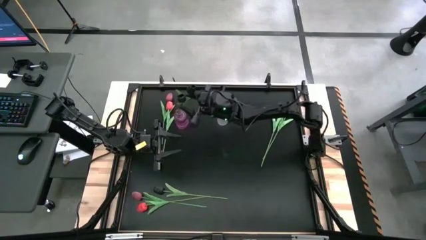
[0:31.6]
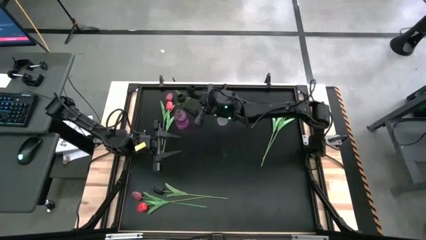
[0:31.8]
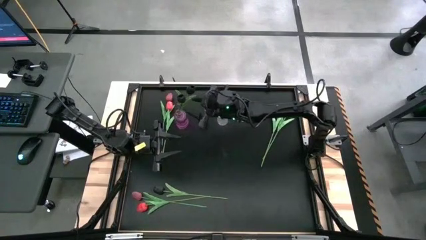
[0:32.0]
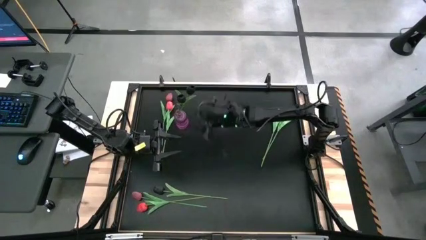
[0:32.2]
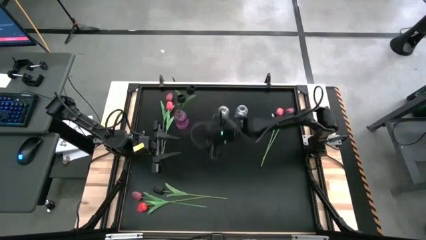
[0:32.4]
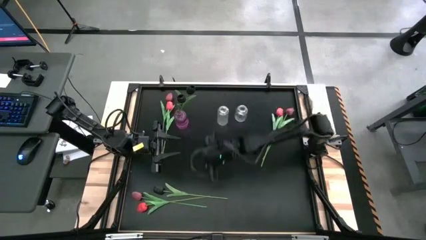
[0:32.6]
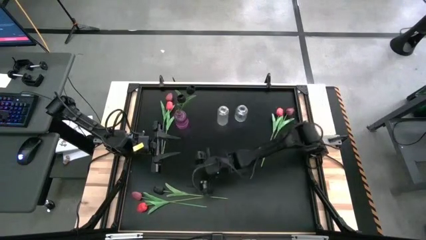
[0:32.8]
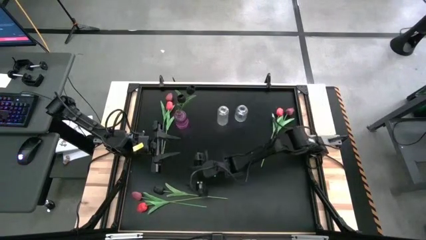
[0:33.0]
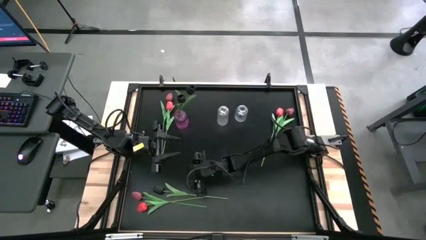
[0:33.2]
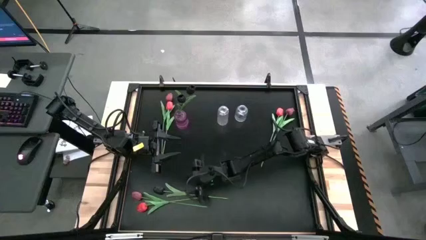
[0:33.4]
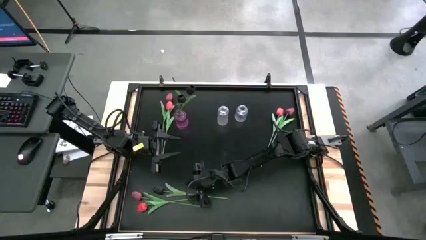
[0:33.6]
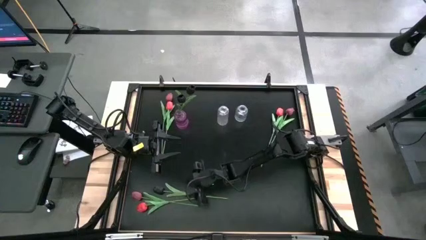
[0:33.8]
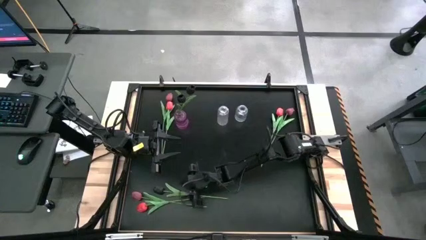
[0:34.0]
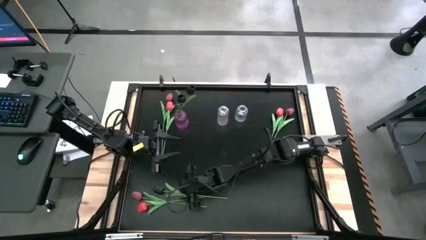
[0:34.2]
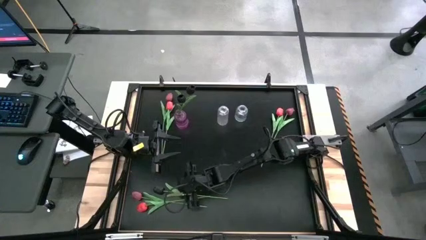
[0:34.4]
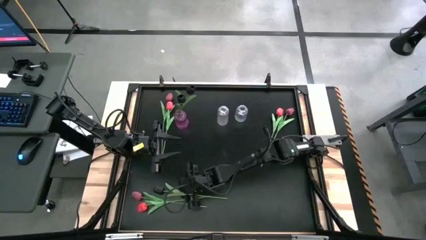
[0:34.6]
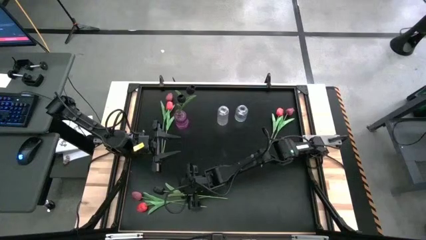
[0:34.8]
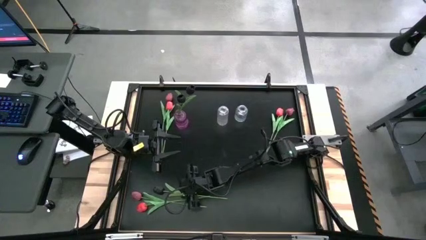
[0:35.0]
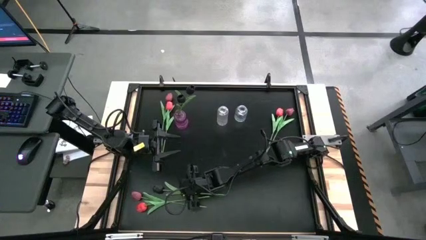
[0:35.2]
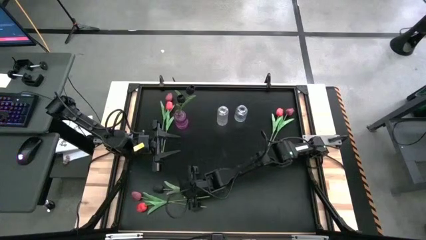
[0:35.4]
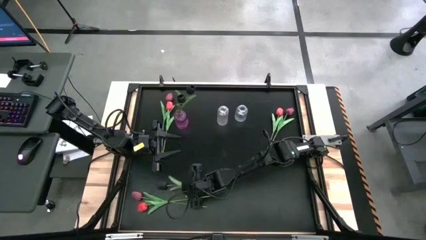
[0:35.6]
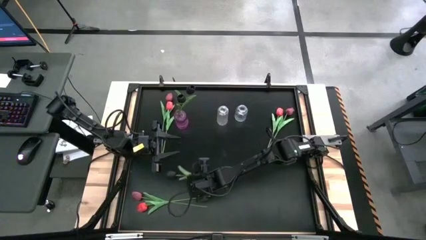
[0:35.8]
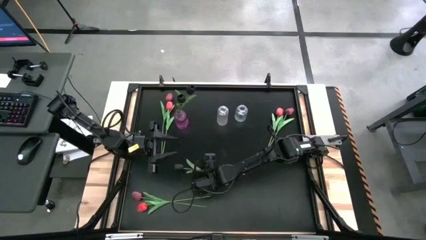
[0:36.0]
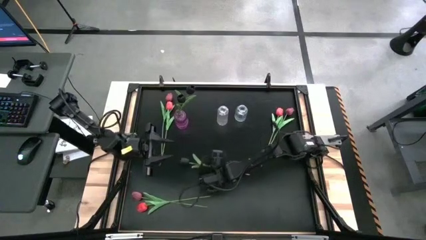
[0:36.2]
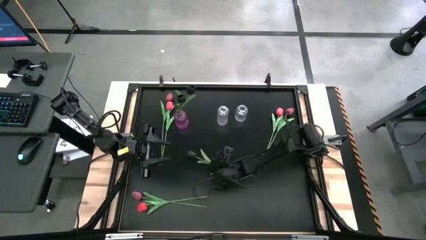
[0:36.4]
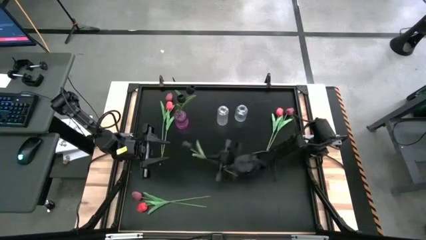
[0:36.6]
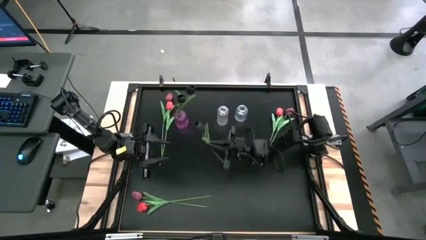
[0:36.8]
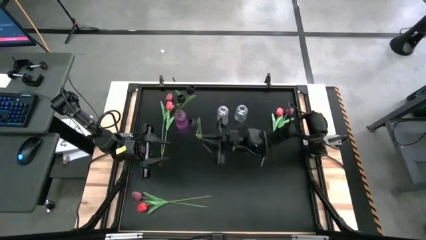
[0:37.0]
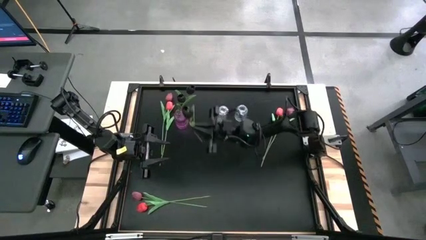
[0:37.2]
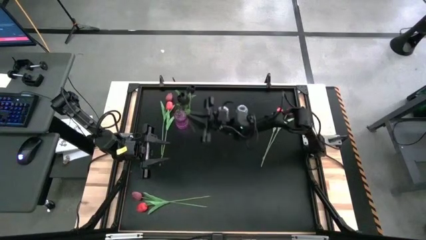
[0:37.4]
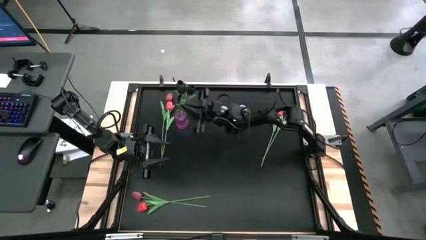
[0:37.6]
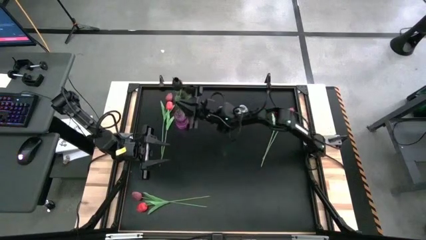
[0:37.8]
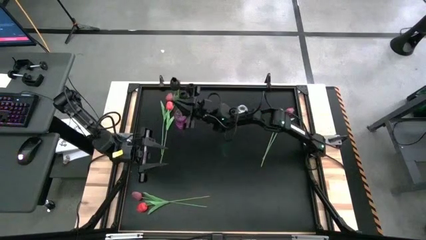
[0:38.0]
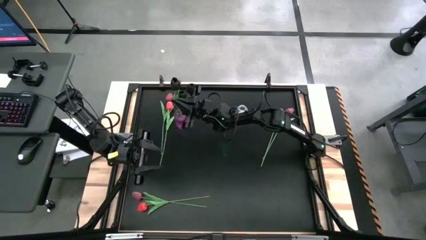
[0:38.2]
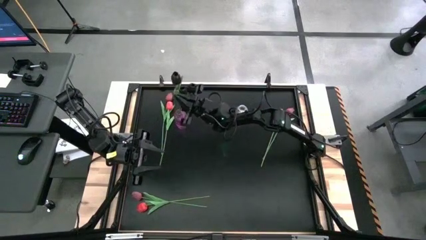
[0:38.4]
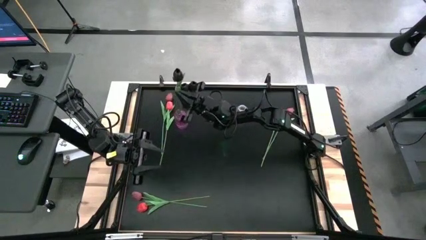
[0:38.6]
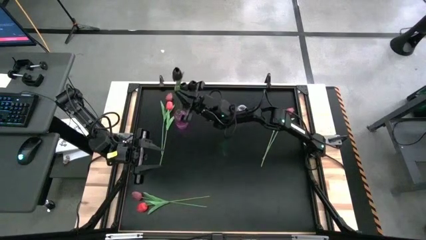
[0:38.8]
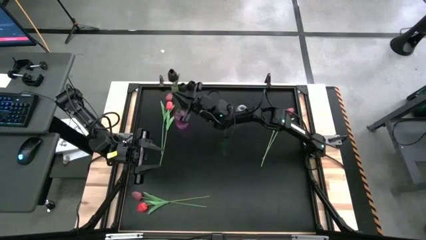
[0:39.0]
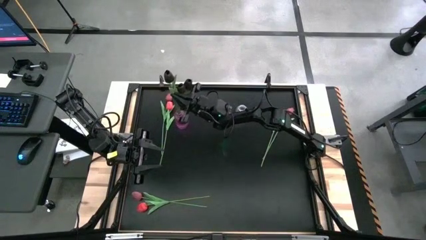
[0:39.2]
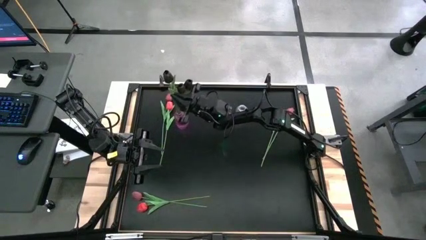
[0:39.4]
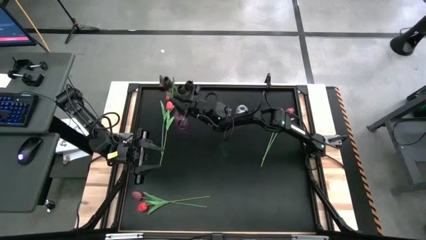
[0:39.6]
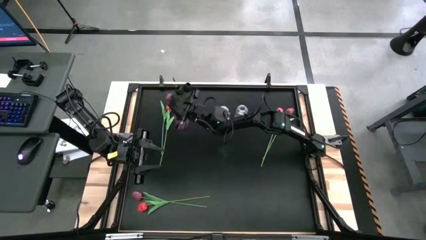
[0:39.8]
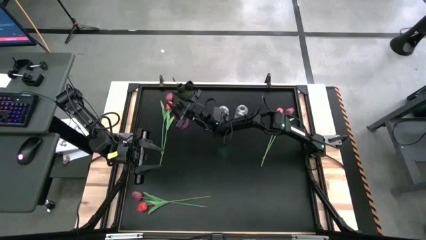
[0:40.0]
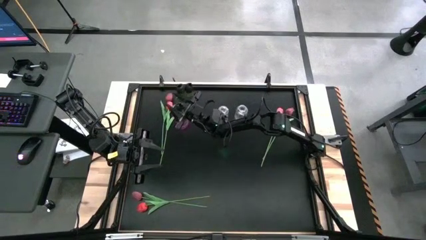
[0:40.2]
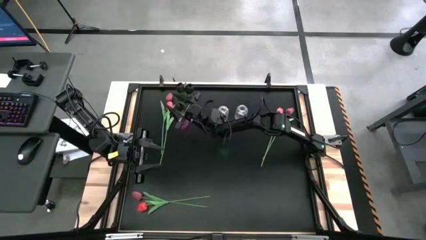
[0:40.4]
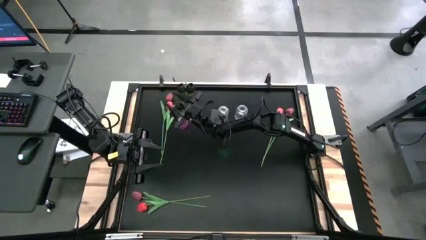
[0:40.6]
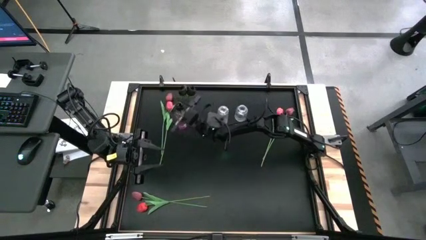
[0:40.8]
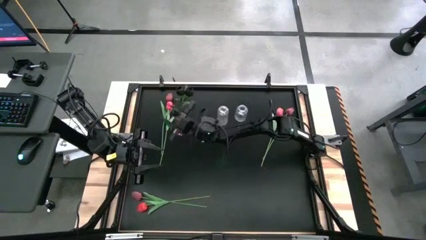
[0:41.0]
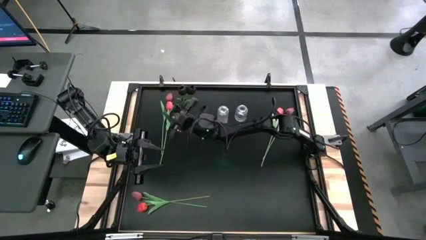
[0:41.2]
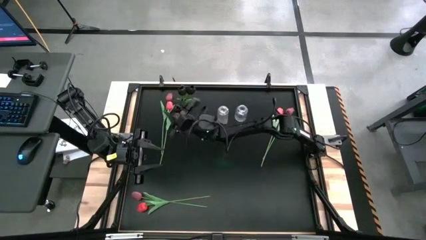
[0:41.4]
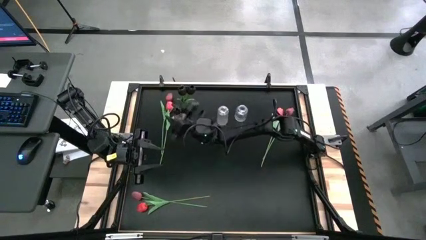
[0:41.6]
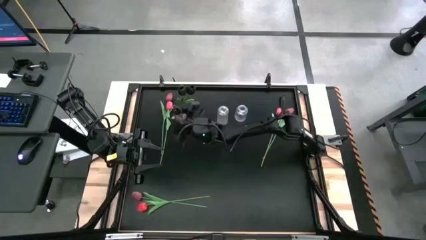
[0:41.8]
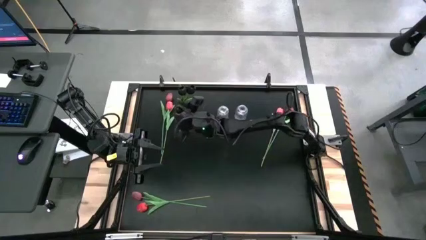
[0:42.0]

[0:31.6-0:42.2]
Task: Sort flowers into vase by color
Put the black flower into the transparent purple vase

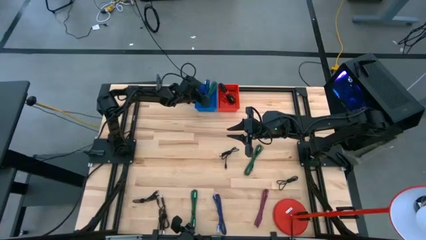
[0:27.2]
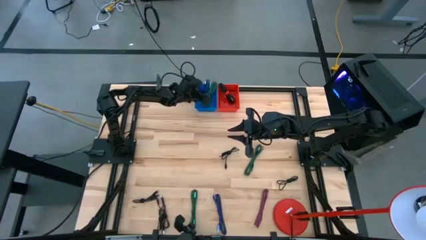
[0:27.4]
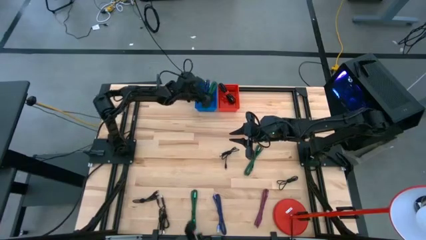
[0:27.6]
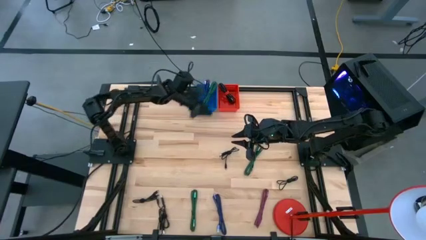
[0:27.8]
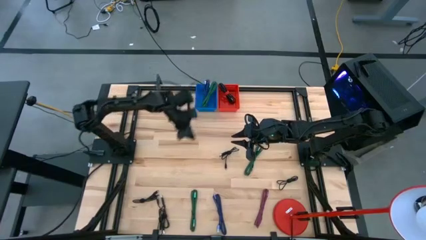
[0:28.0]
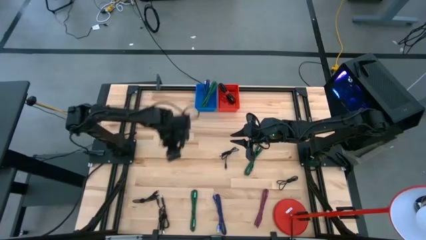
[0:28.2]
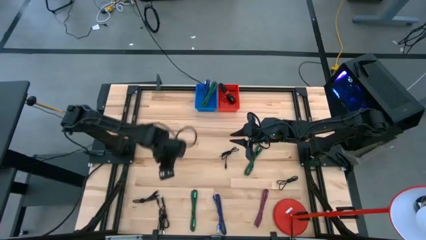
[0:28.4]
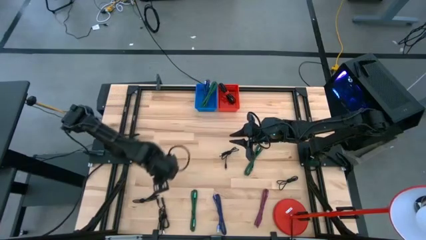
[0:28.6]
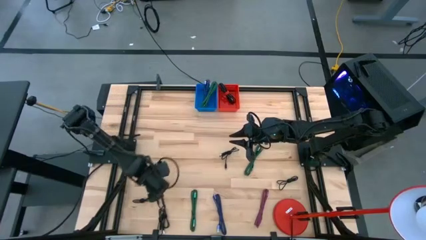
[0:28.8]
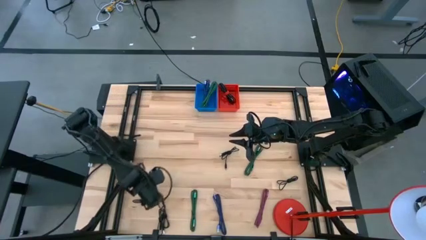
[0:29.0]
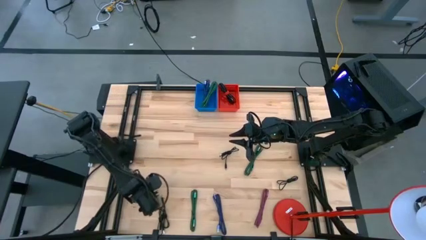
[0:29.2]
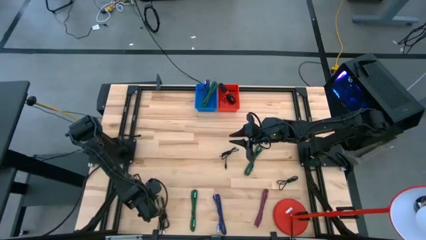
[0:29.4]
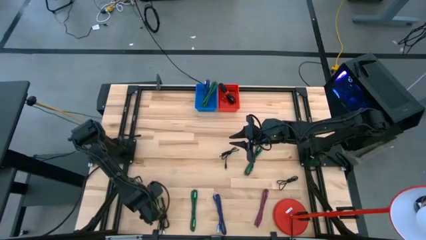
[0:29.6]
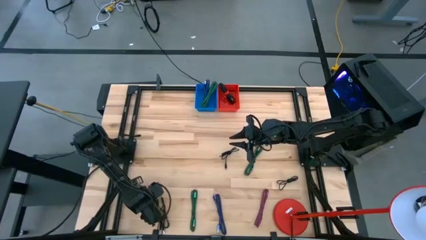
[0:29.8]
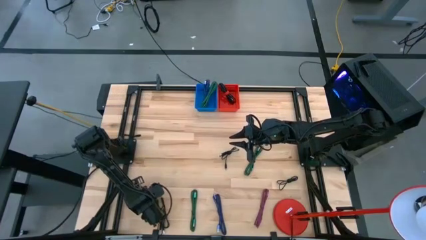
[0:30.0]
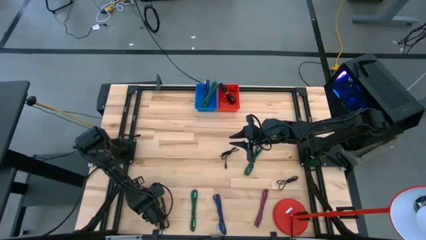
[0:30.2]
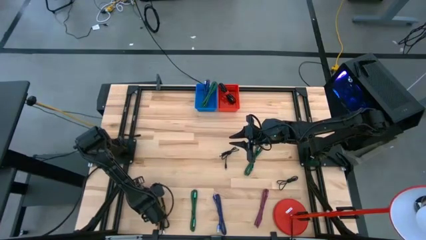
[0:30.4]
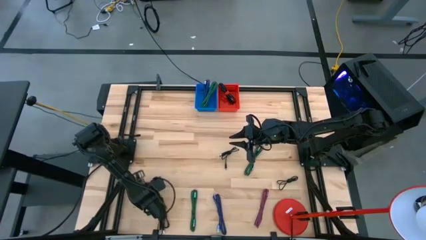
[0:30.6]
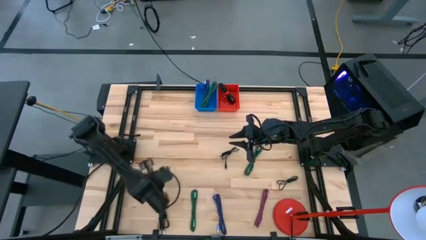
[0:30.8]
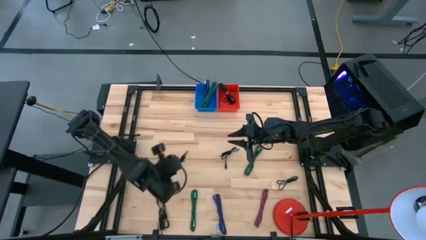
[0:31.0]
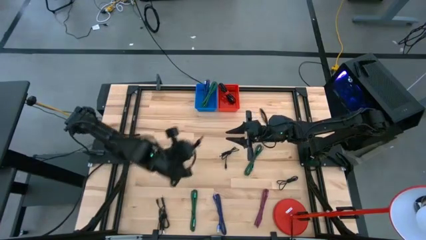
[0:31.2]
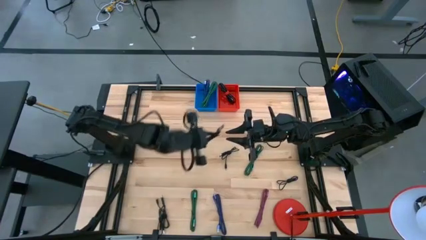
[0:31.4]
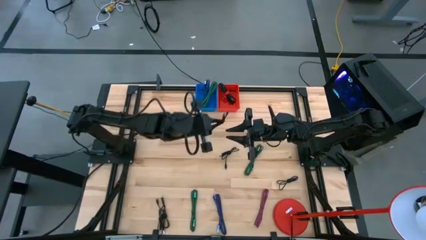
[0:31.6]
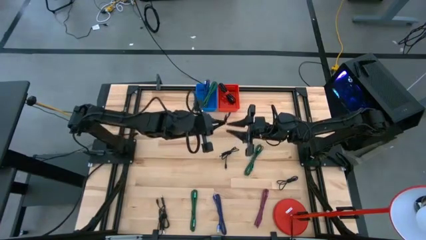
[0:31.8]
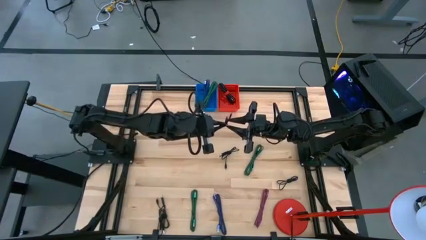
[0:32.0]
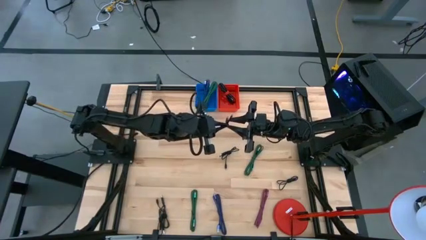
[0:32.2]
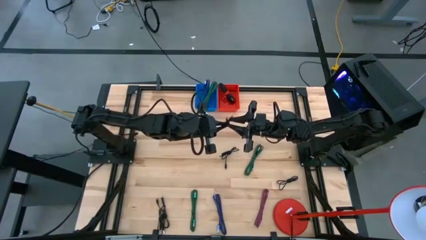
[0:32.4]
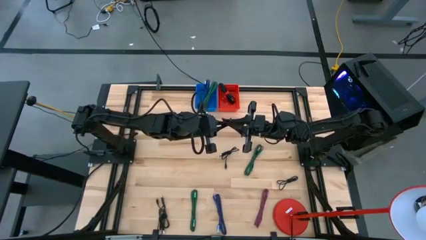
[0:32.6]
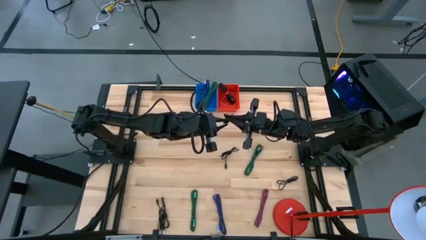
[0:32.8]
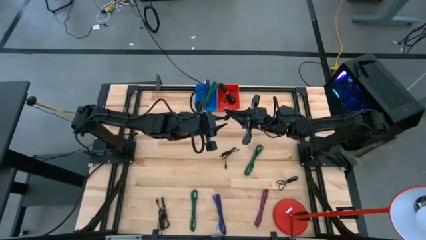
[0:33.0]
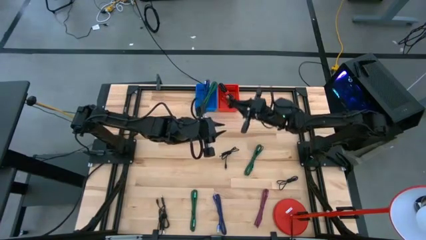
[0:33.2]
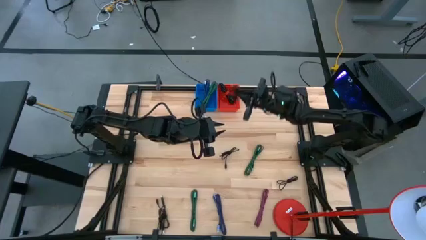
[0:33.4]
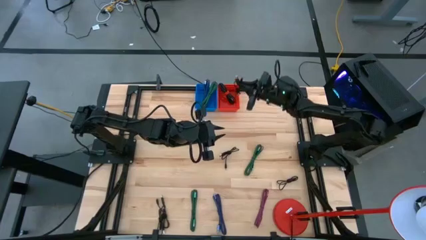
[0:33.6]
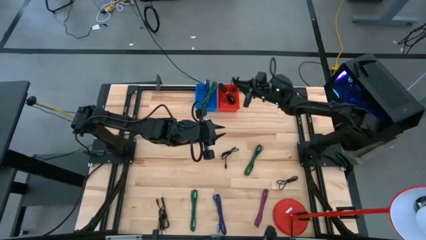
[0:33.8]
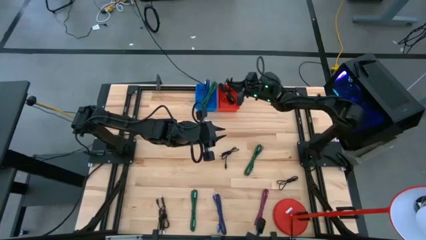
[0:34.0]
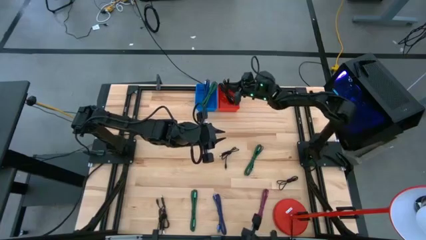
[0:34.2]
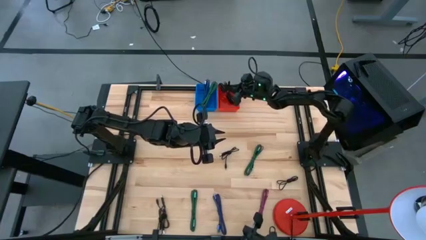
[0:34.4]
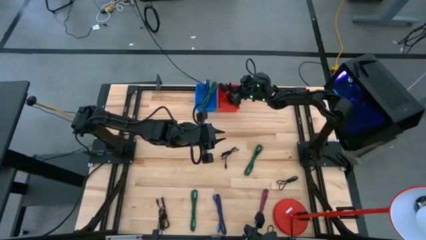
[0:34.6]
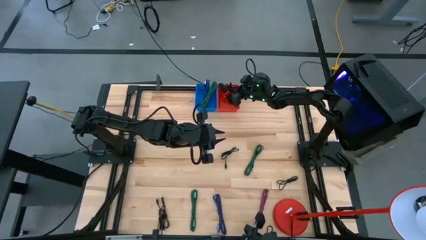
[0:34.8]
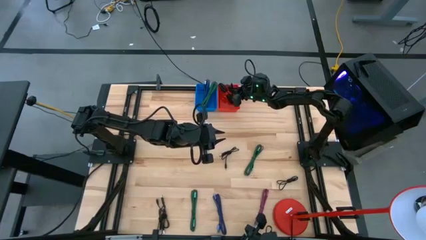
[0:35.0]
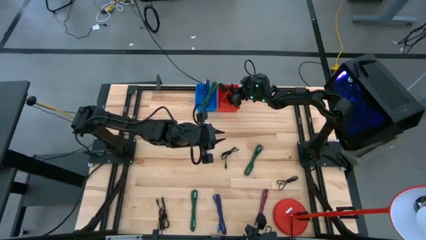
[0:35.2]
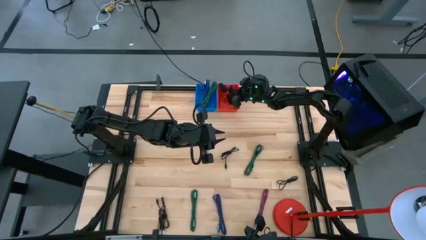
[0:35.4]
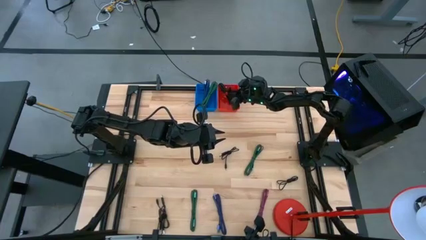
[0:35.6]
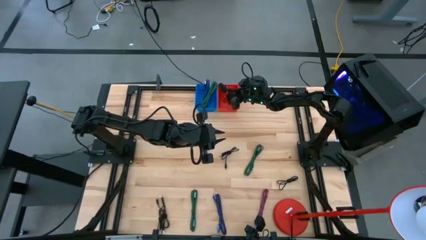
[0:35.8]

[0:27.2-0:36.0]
Task: Pick & Place USB Port
Put the black charger cable into the red bin
